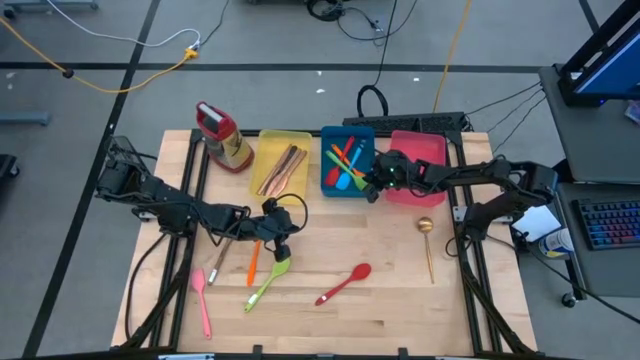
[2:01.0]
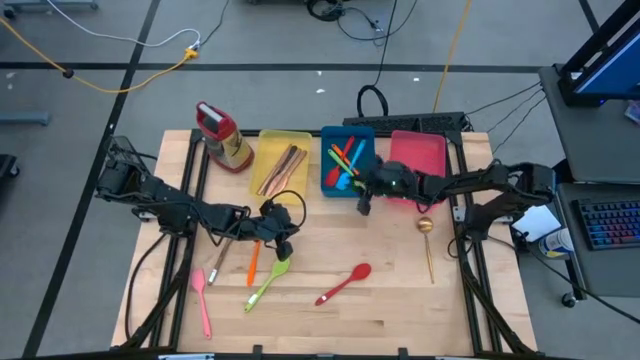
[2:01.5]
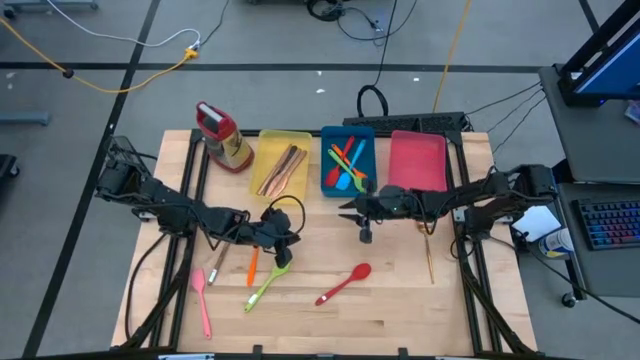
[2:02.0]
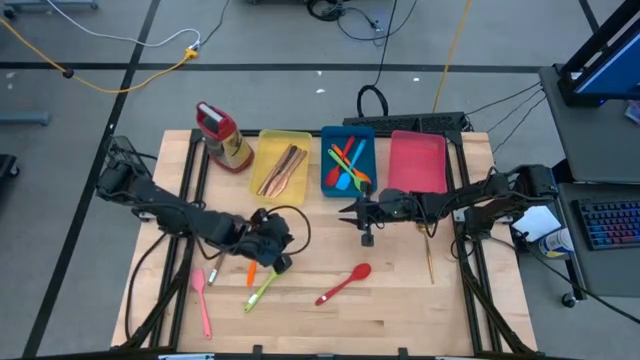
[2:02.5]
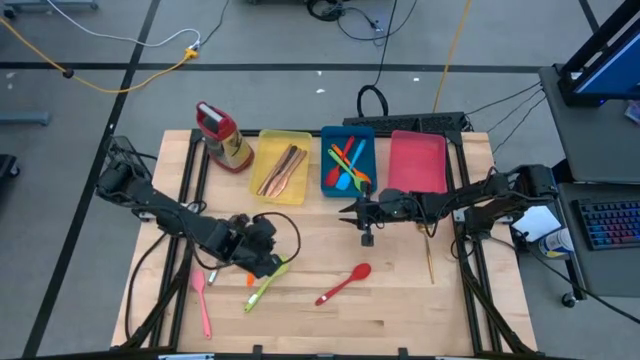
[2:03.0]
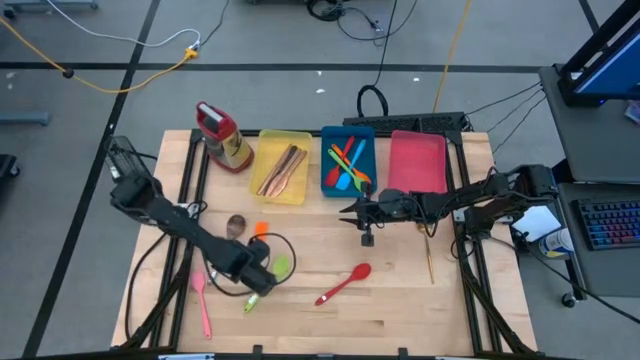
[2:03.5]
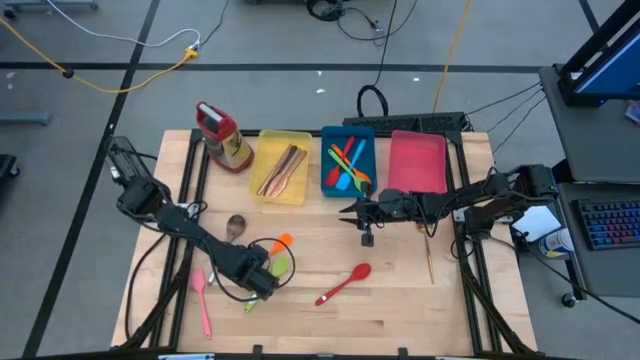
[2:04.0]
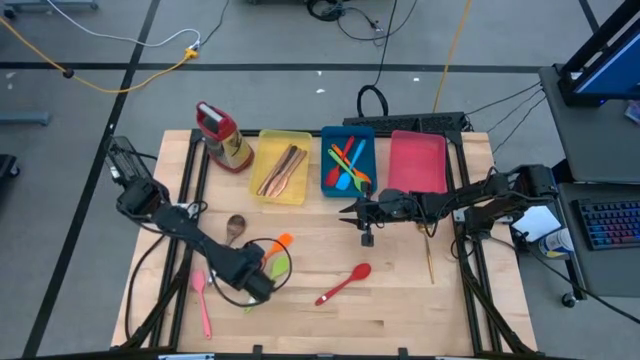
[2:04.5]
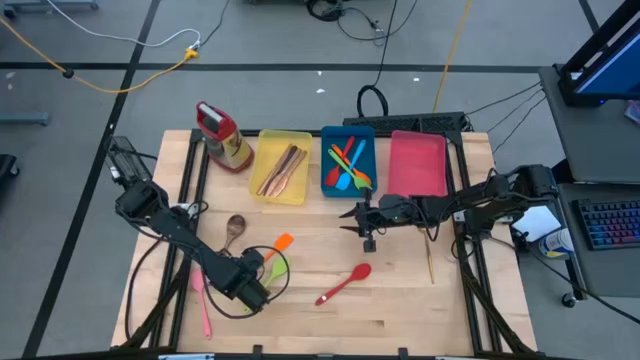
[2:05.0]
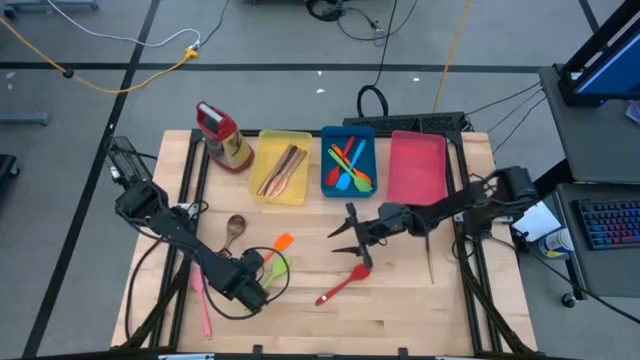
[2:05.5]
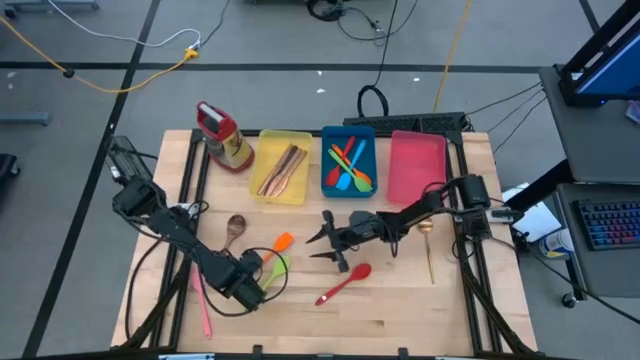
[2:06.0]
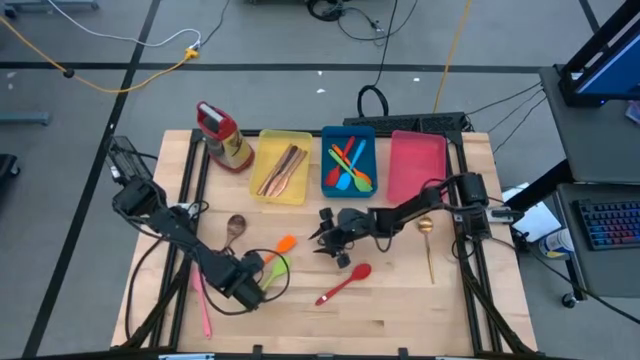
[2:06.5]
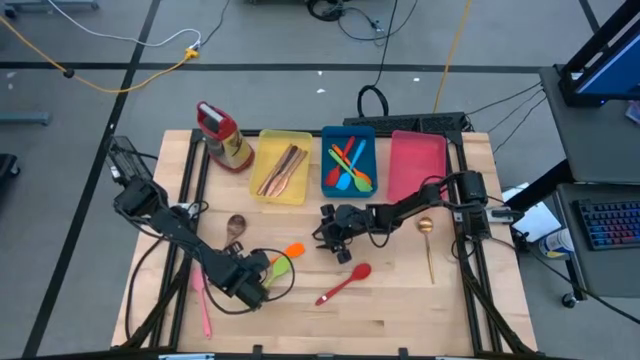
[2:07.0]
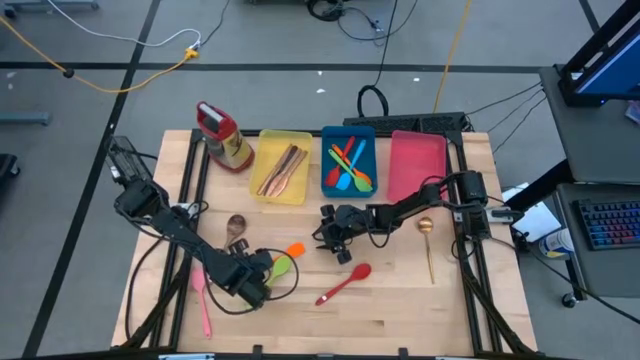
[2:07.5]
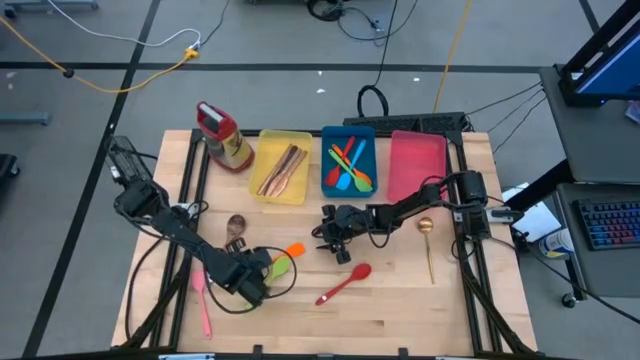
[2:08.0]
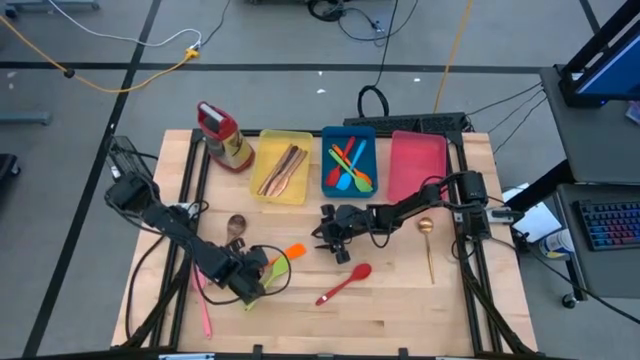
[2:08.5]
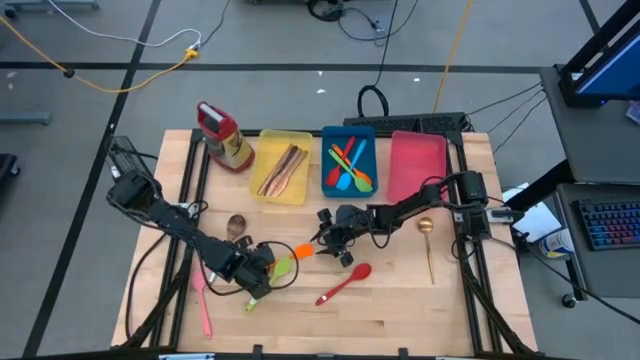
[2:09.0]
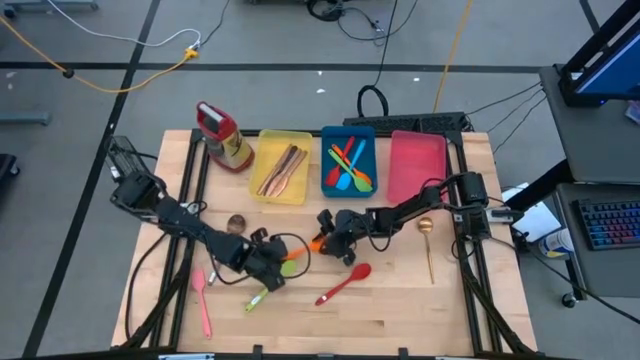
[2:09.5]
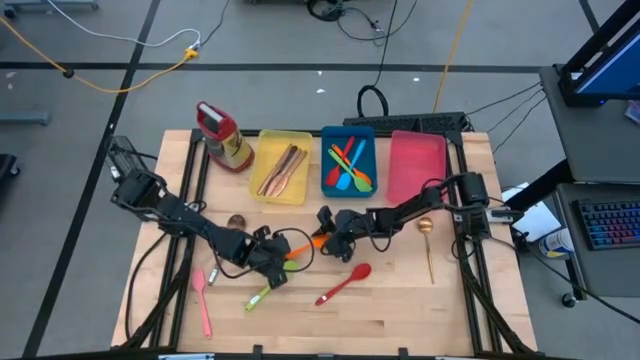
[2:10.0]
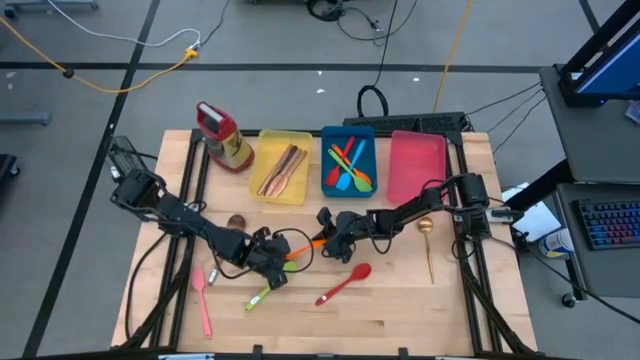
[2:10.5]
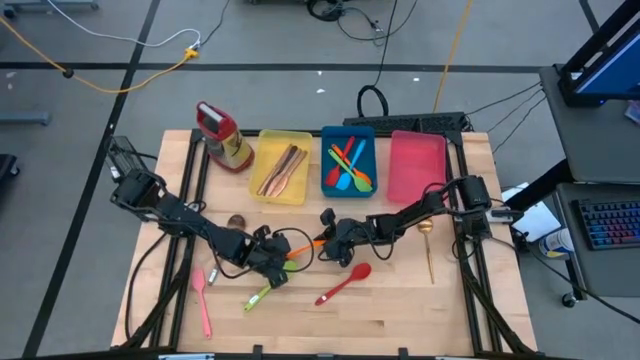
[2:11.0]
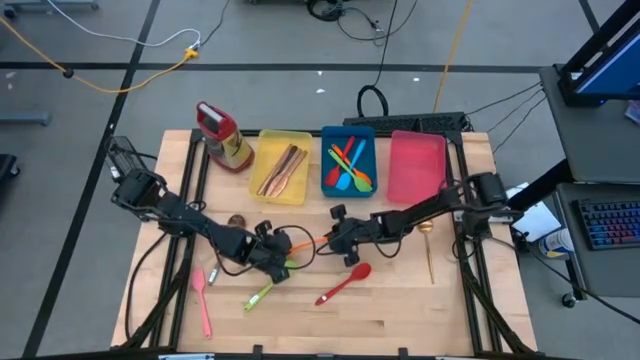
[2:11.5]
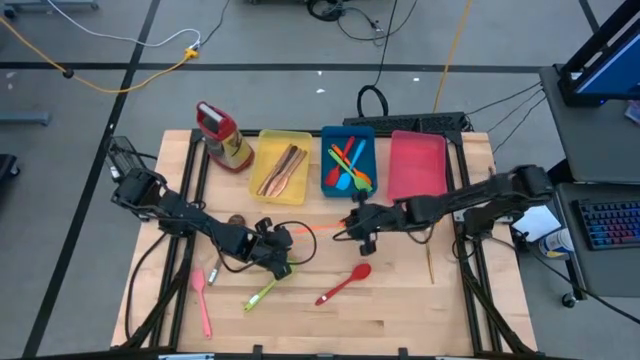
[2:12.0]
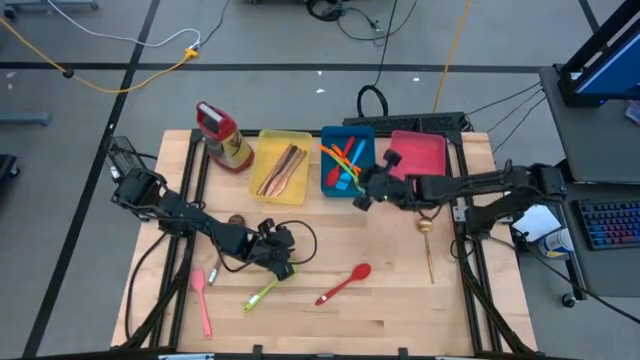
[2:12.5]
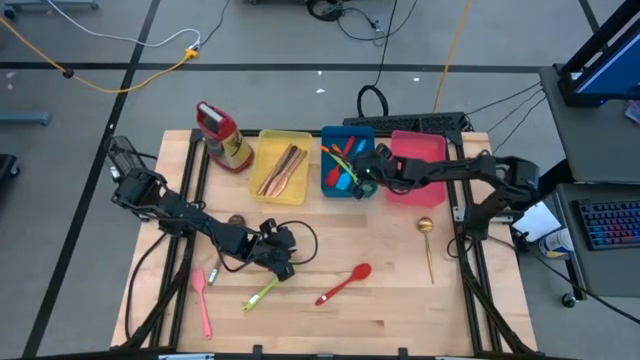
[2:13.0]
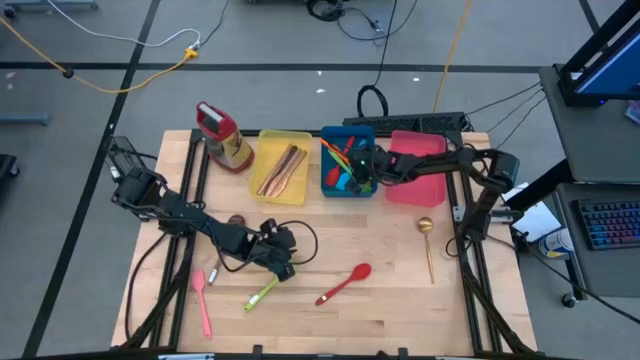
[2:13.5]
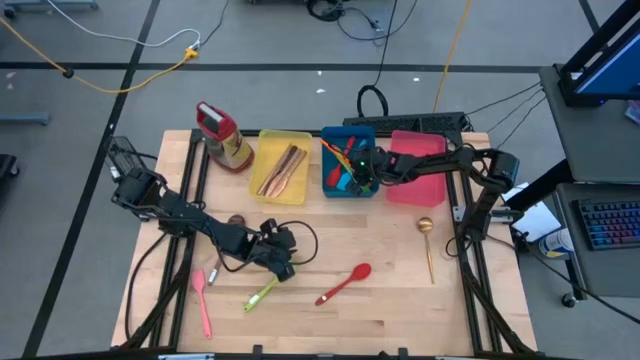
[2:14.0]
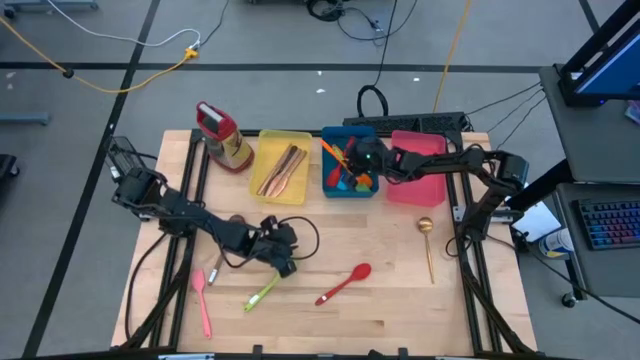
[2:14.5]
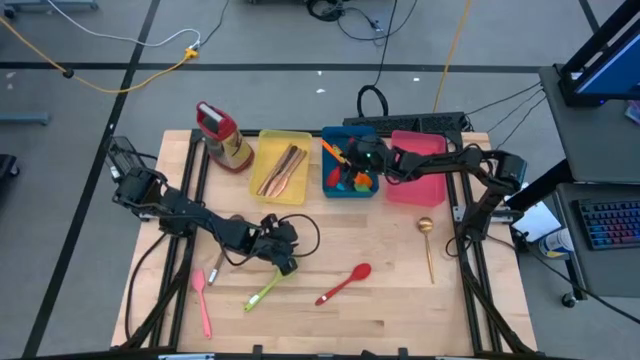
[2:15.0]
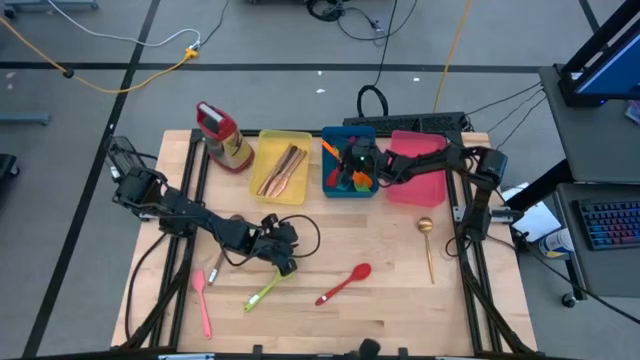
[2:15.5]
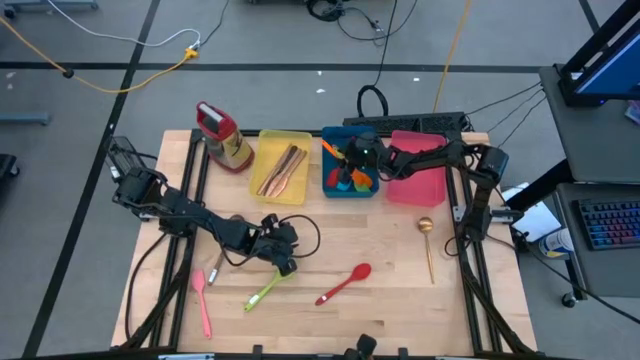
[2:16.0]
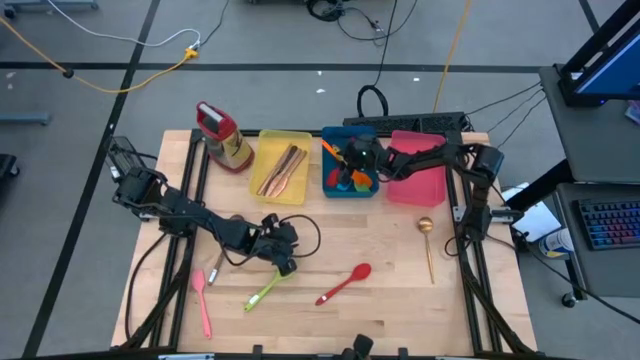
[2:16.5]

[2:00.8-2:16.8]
Task: Pick & Place Kitchen Items
Put the orange spatula into the blue bin

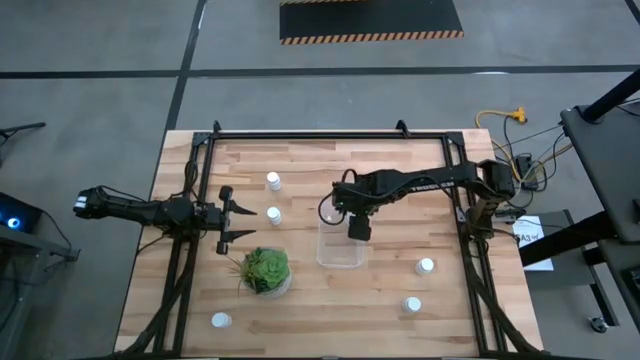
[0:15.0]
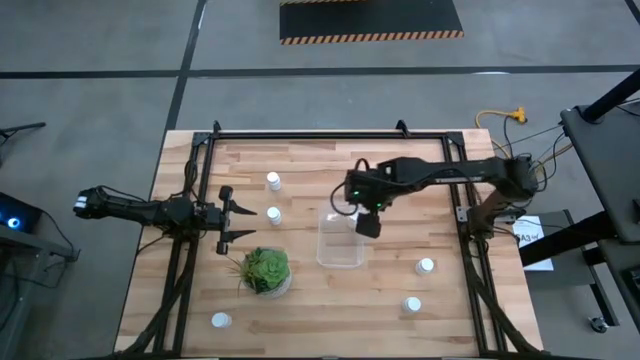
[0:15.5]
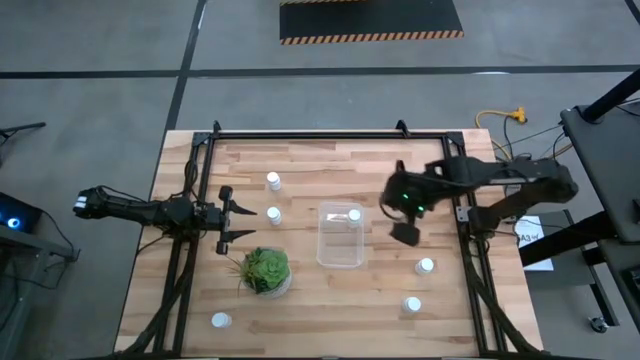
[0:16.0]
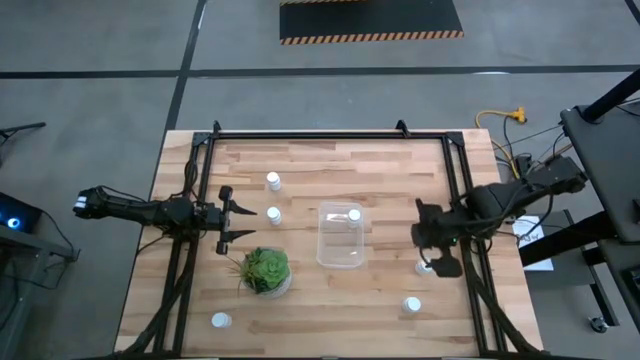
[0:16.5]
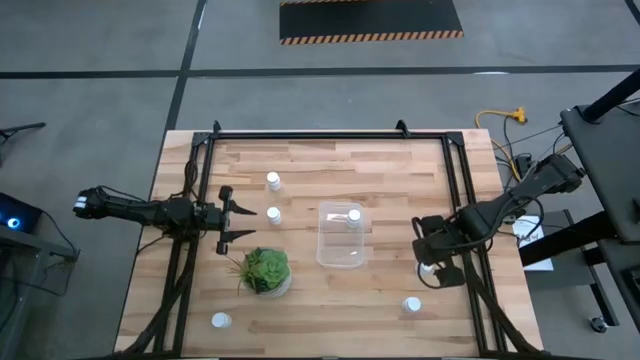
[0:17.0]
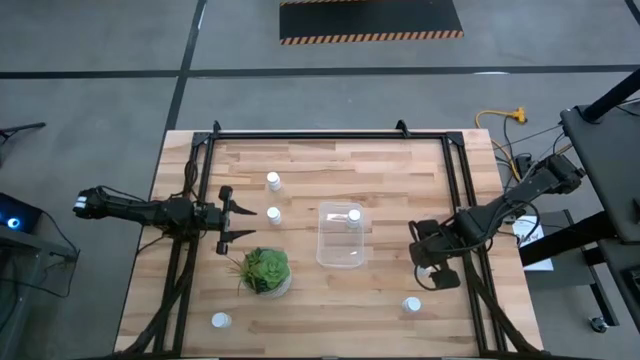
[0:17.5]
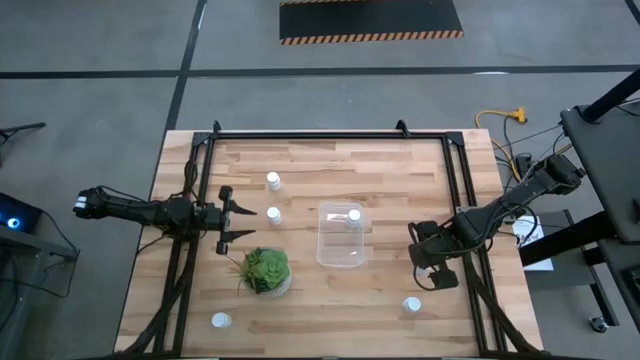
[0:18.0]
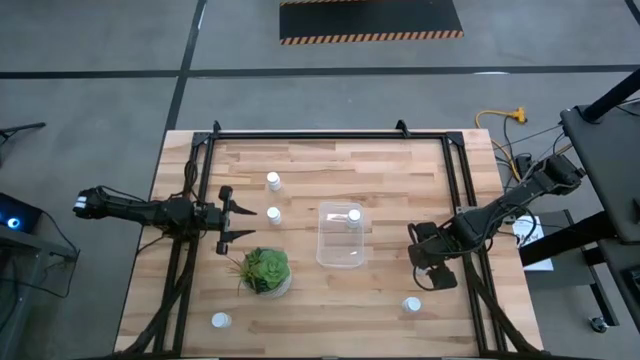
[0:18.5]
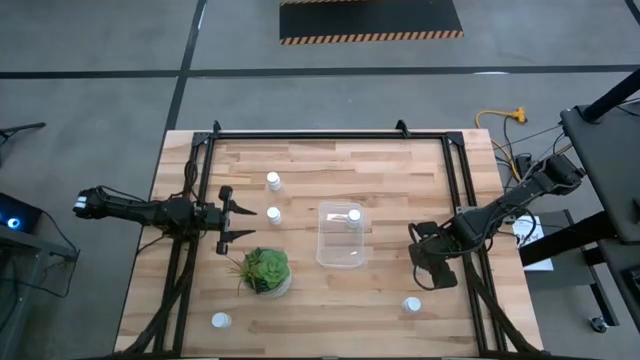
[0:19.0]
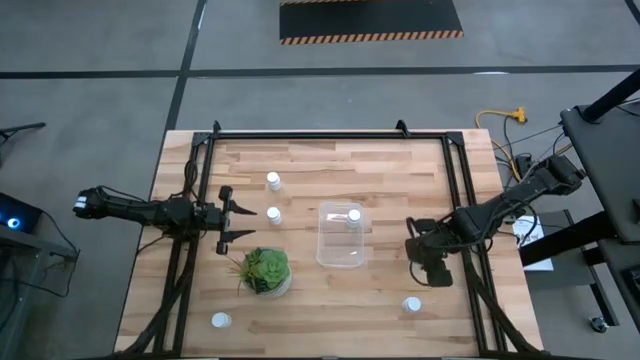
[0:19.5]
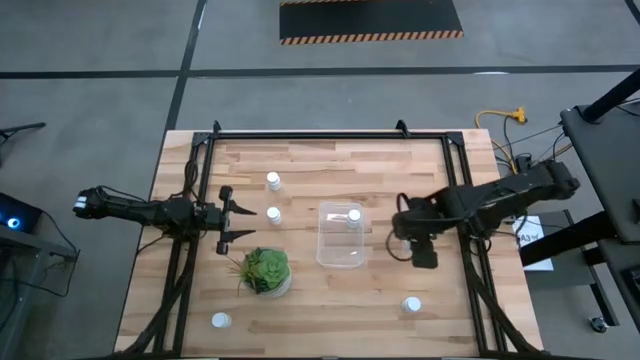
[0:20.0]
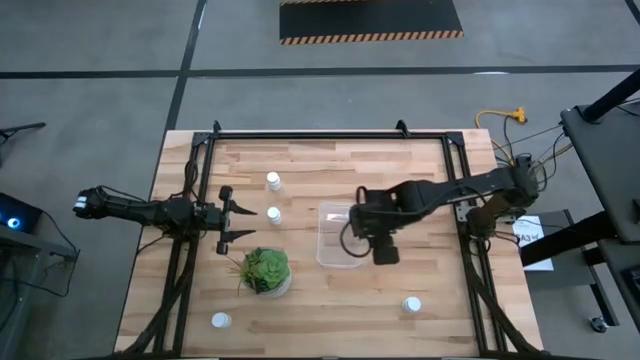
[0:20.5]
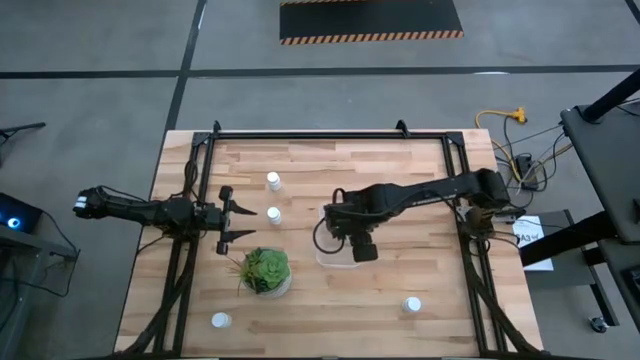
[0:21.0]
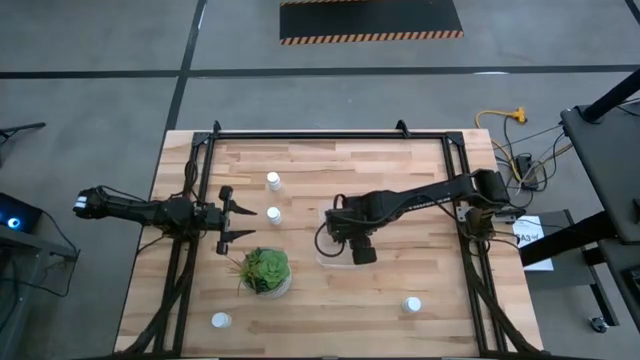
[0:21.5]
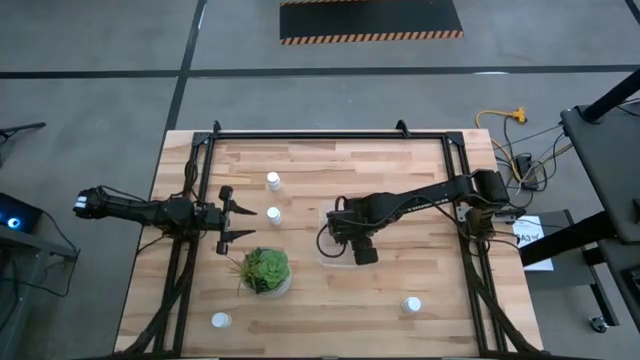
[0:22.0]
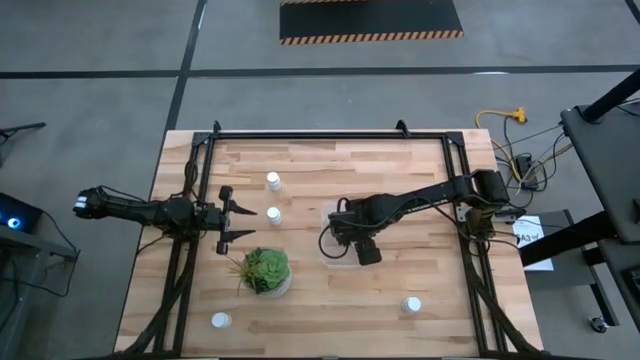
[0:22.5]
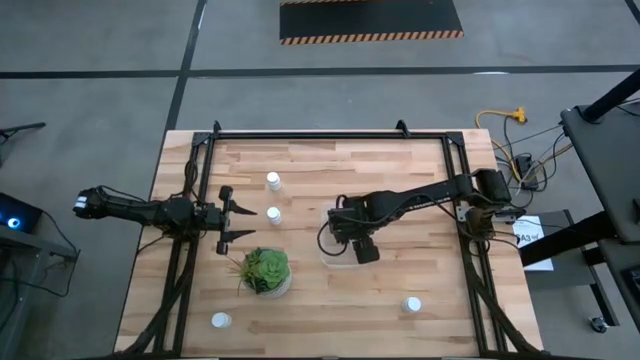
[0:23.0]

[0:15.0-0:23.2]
Task: Pick and place pill bottles into a basket
Put the white medicine bottle into the transparent bin
